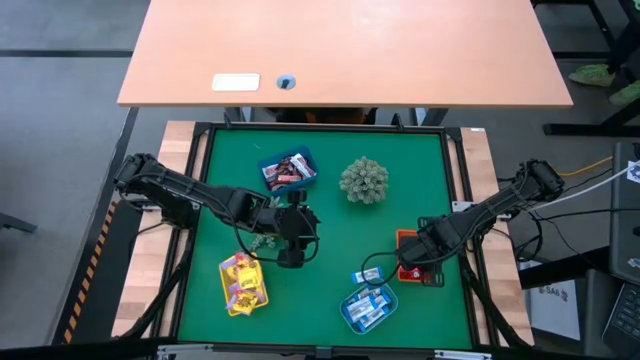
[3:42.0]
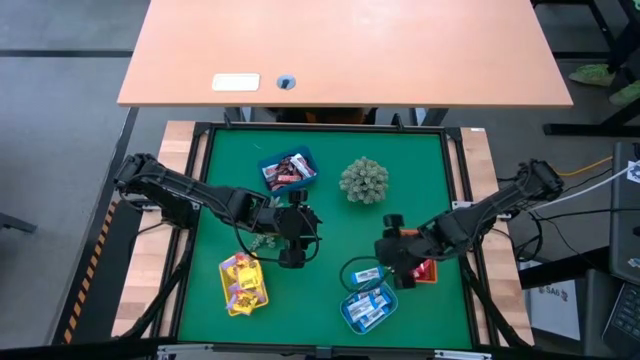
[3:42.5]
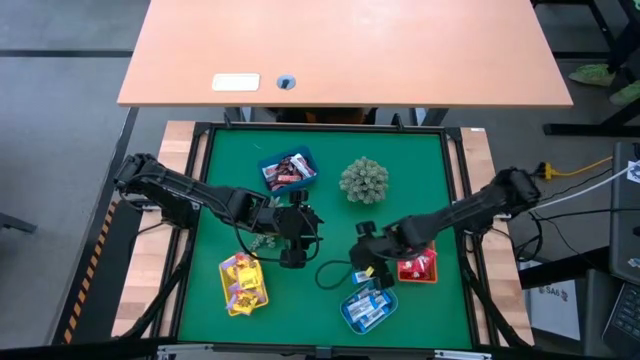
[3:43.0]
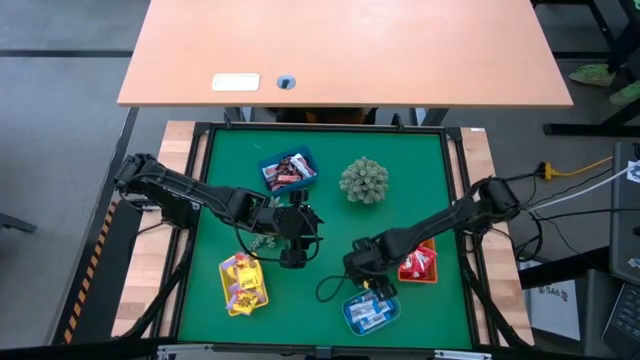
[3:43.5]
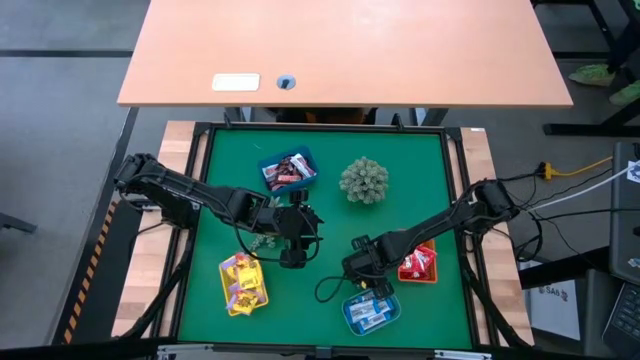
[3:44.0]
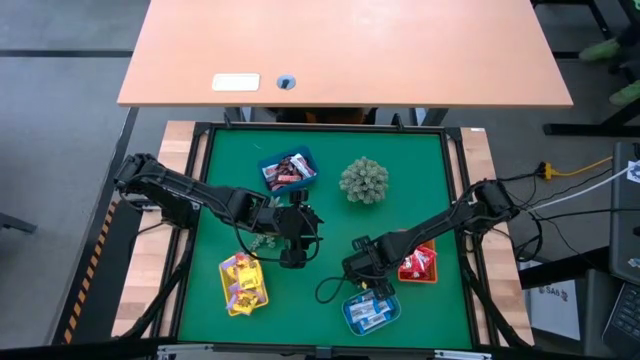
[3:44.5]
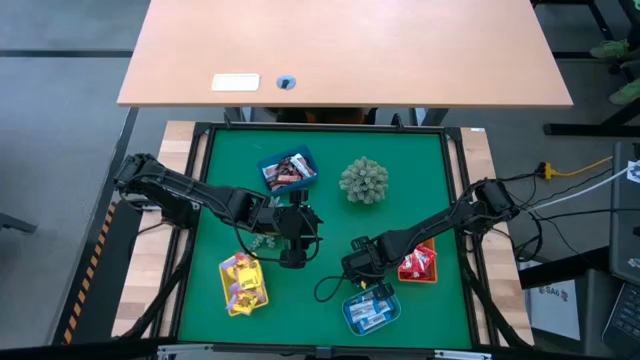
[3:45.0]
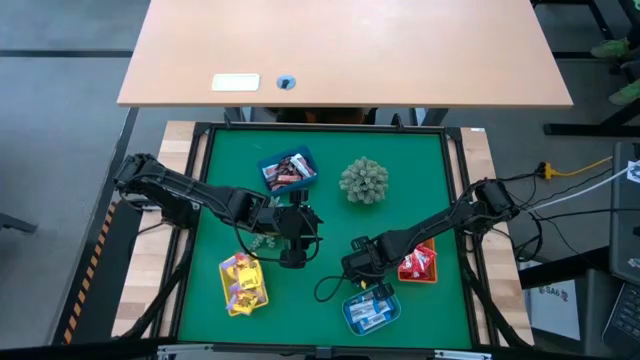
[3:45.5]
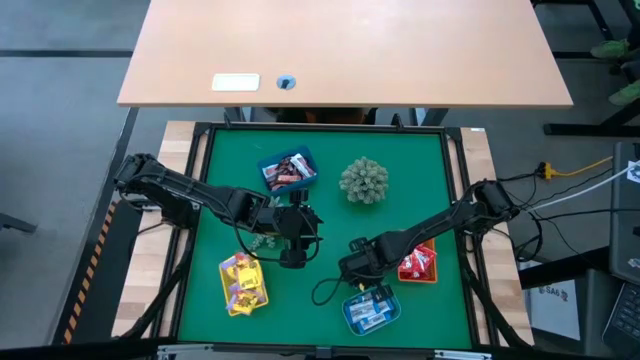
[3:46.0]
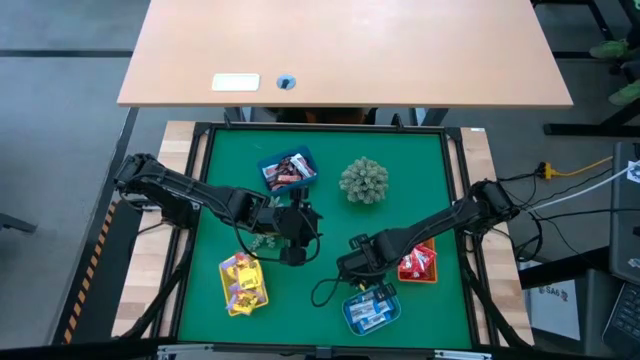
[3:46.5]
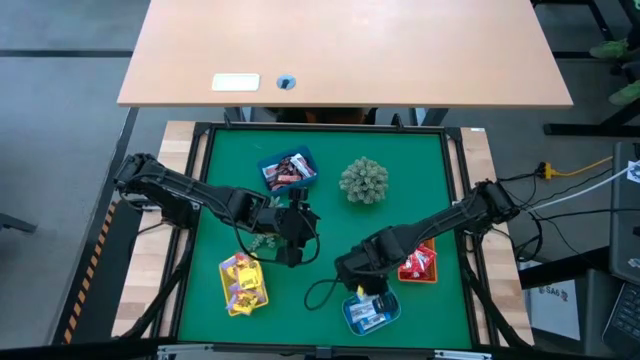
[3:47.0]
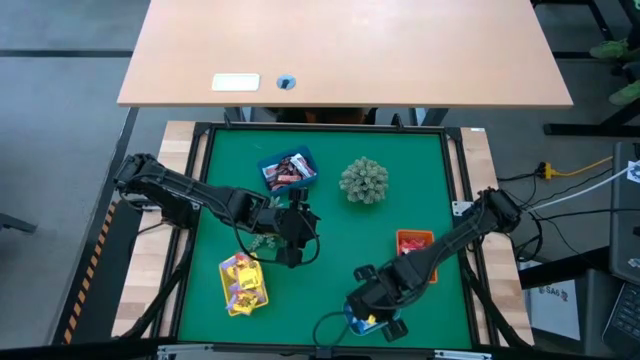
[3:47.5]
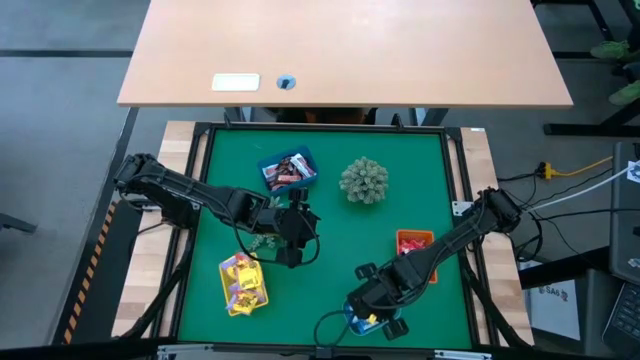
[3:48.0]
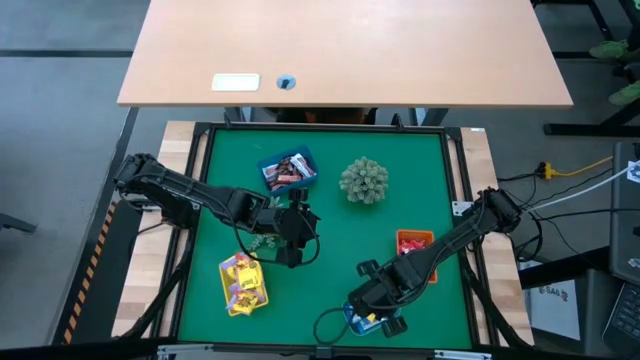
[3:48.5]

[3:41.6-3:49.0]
Task: Sort candy
Put the white and blue chocolate bar into the light blue bin

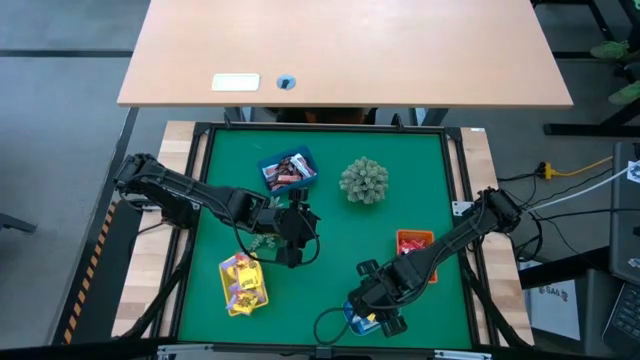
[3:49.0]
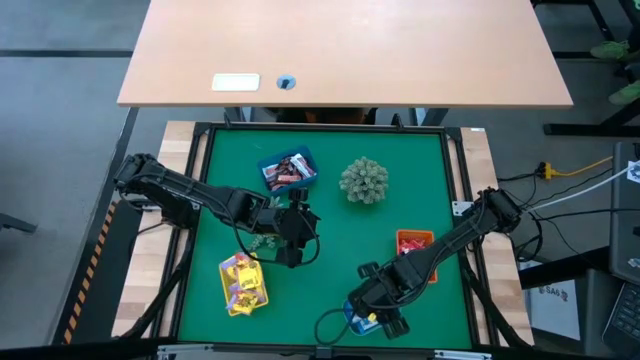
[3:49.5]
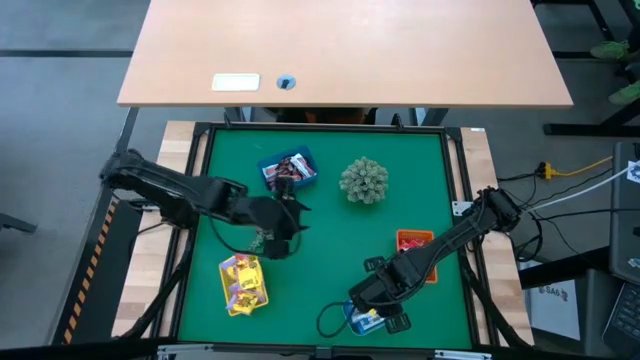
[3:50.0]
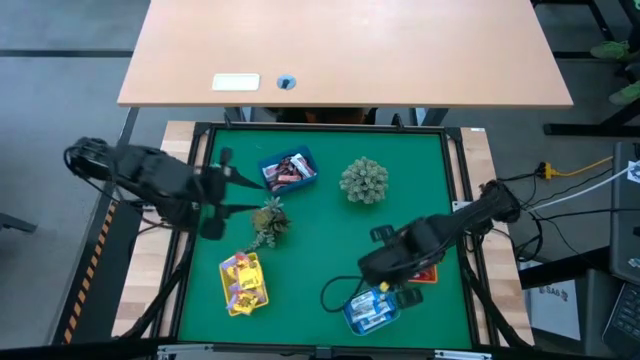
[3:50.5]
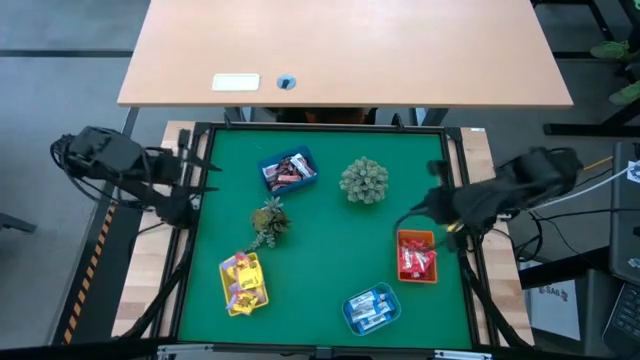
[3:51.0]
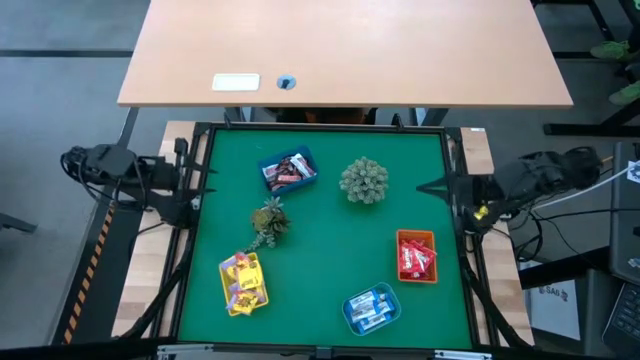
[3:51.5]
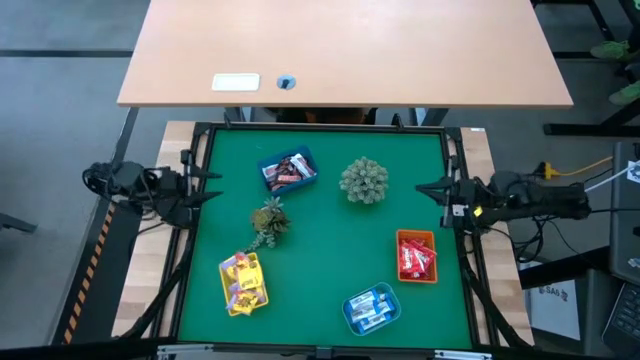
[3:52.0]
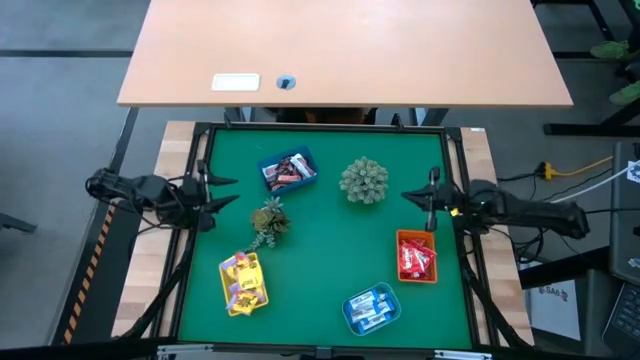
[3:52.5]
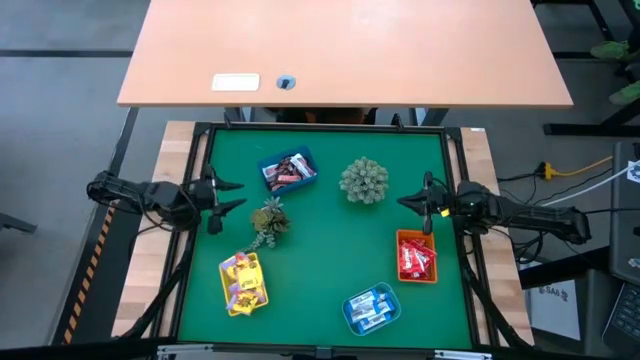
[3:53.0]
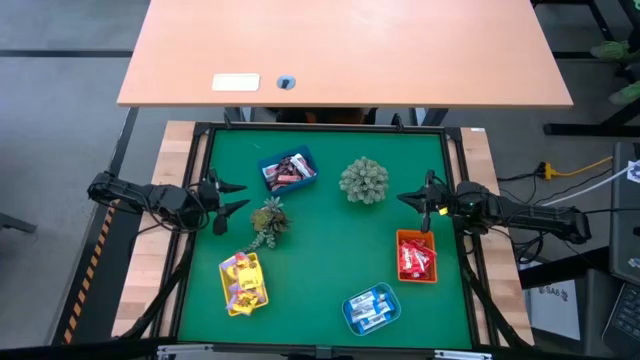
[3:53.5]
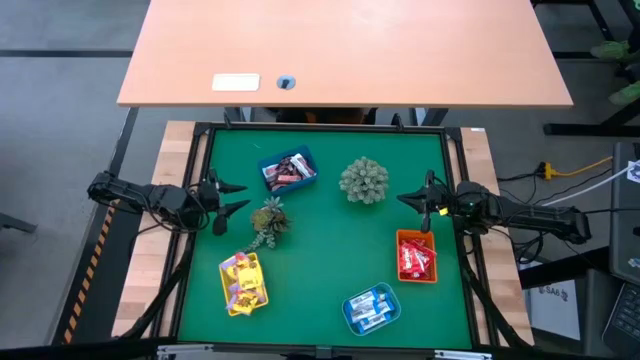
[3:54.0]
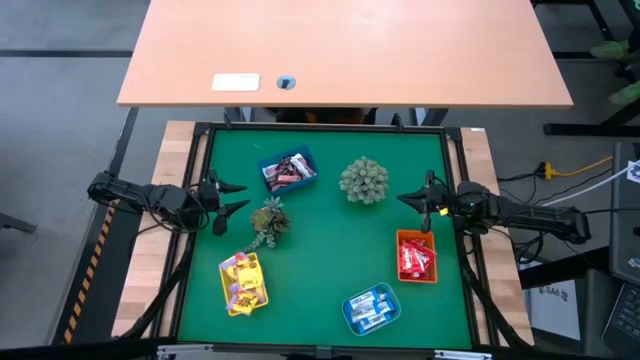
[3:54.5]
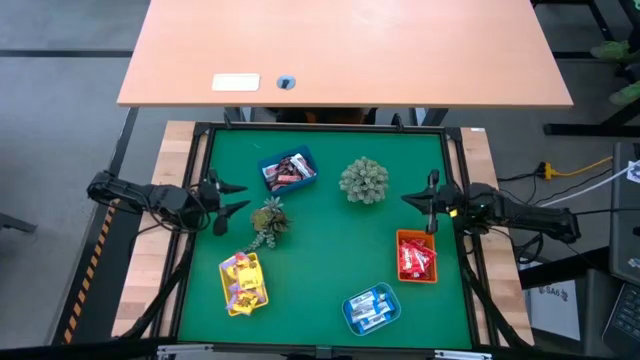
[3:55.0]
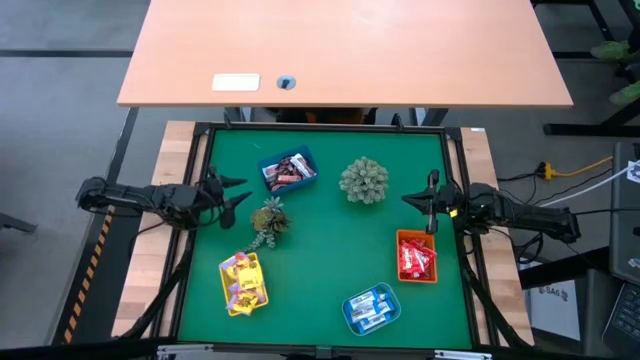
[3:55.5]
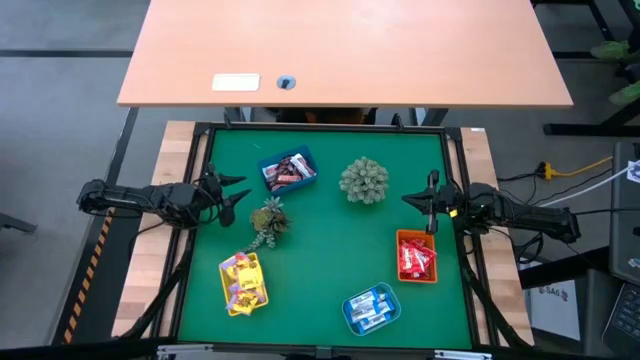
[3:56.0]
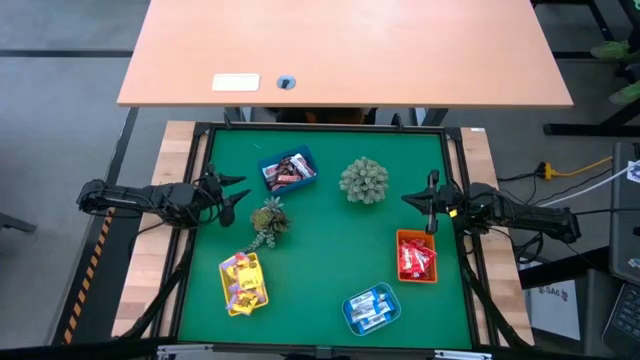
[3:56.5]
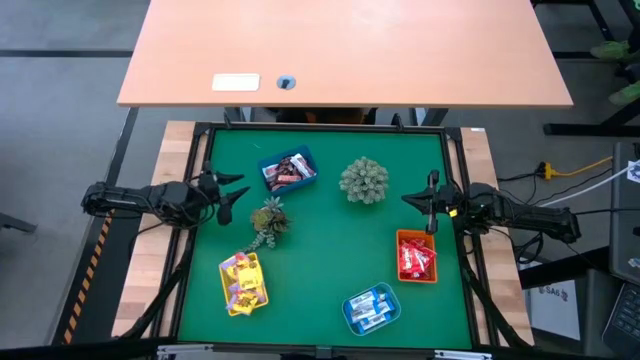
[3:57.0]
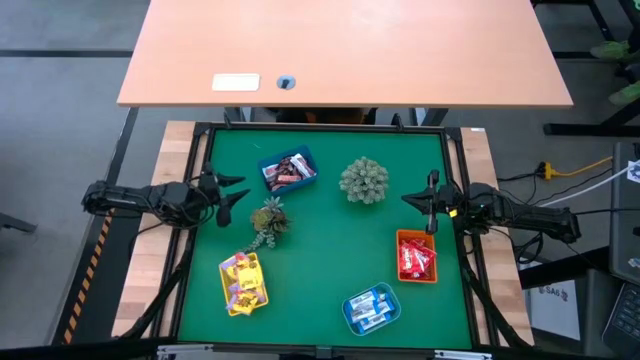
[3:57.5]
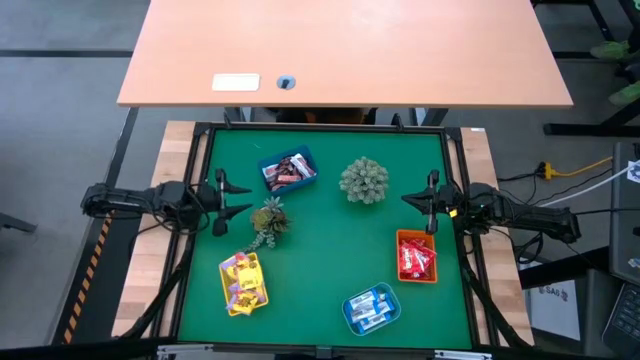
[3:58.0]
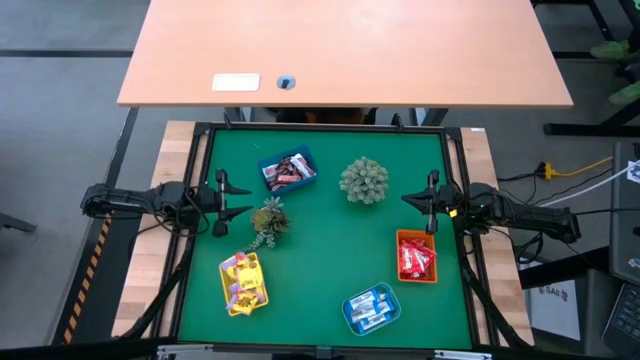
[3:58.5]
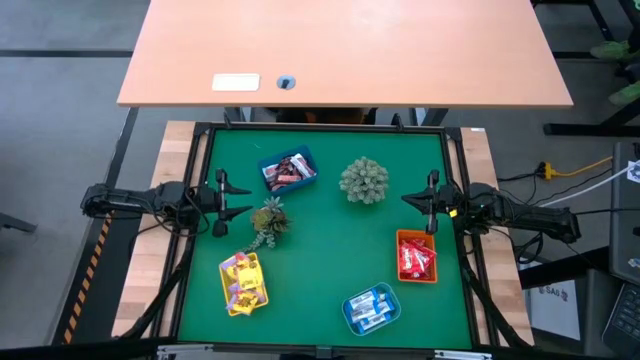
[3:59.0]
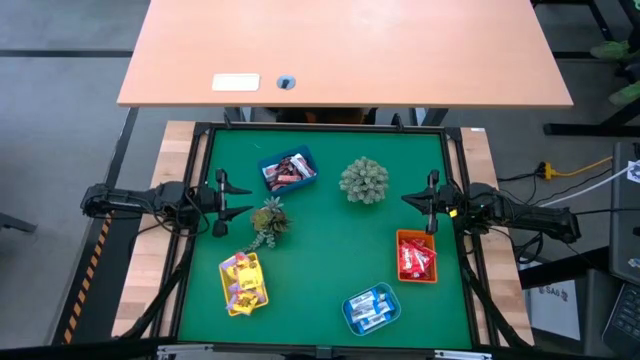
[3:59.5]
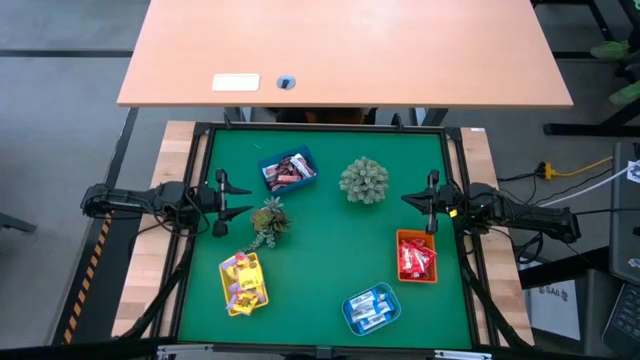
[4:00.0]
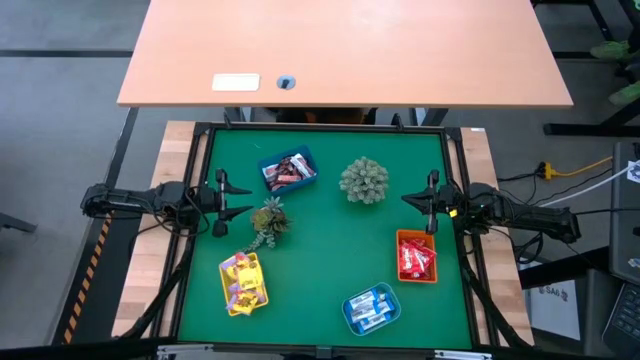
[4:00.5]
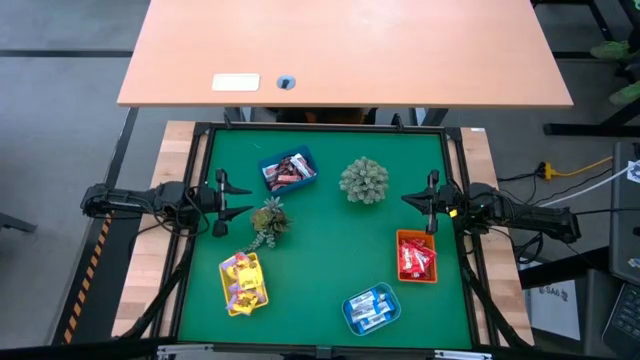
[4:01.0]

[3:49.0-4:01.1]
Return to Home Position

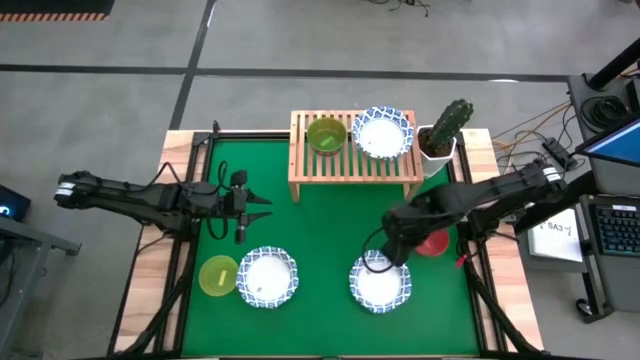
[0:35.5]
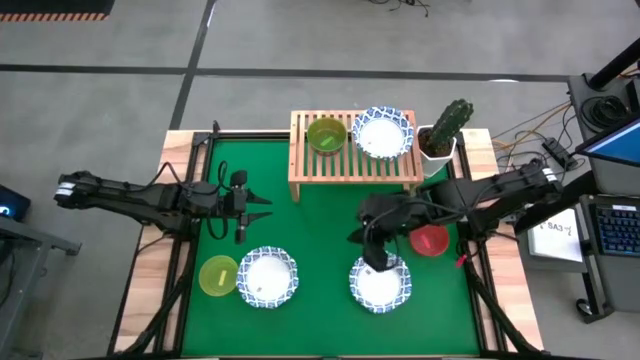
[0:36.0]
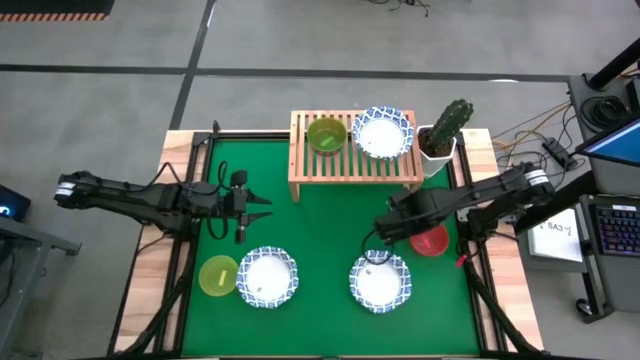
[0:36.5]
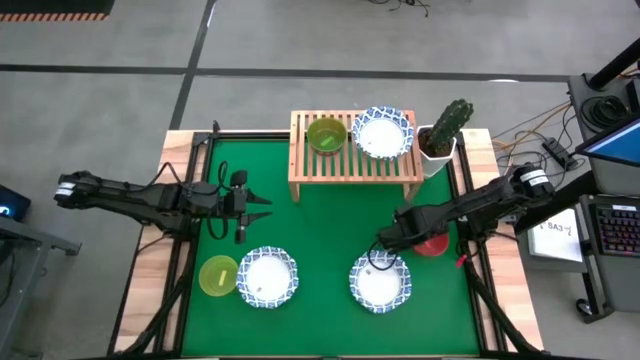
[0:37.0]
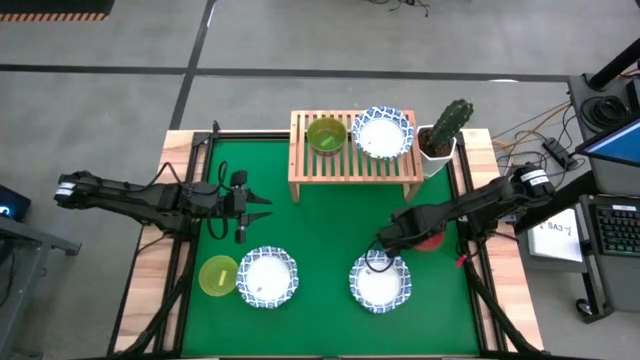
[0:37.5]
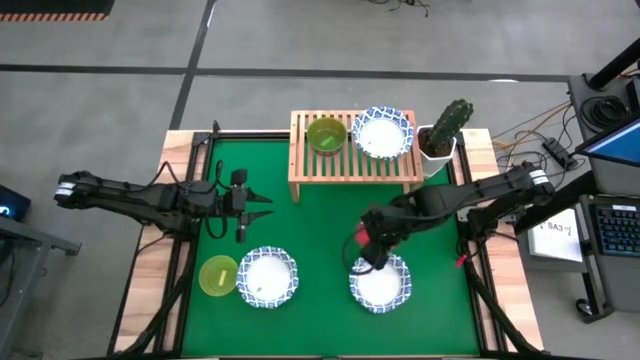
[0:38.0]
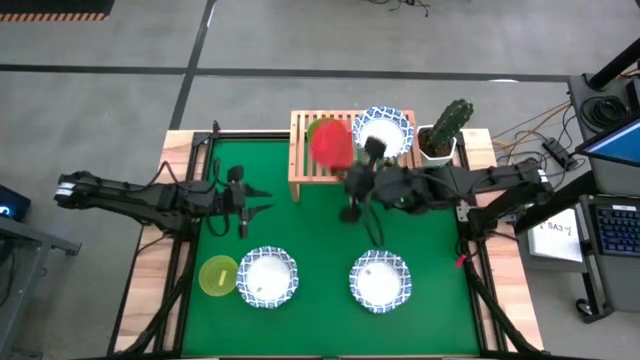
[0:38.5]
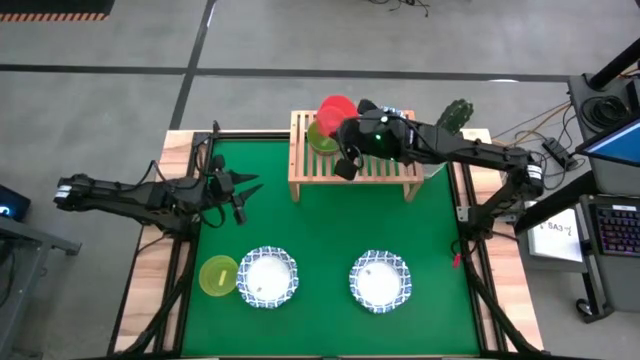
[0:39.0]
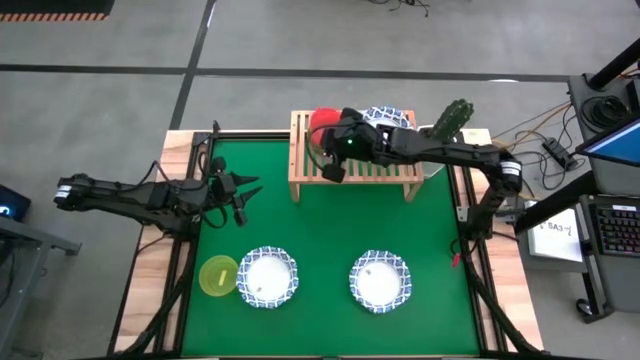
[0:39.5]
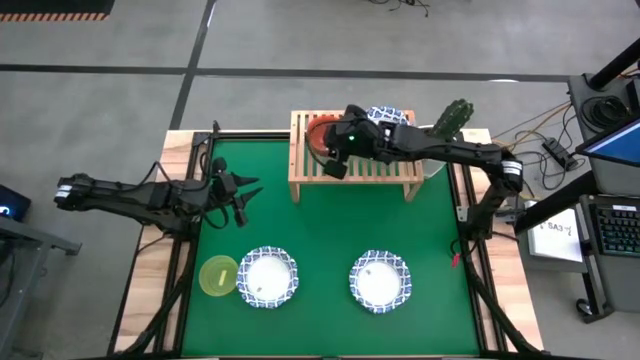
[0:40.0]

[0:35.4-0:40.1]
Task: Place and stack bowls onto a shelf
Stack the small orange bowl on the small green bowl on the shelf
